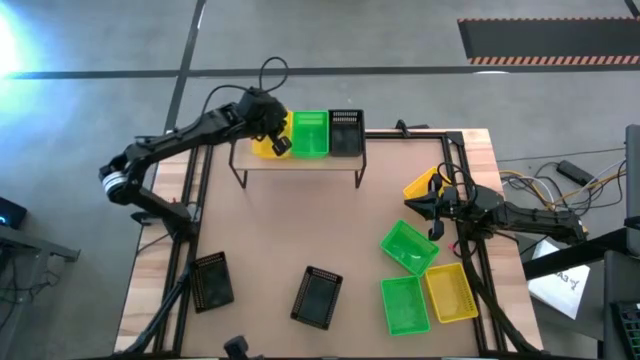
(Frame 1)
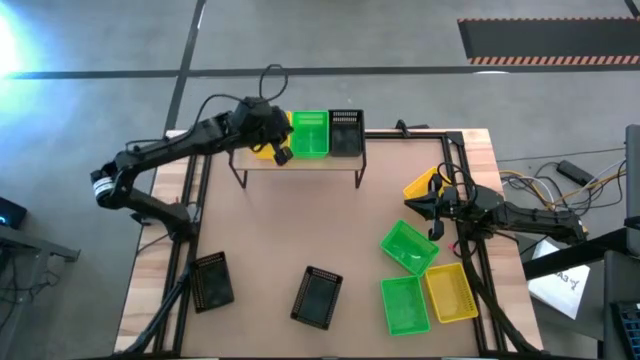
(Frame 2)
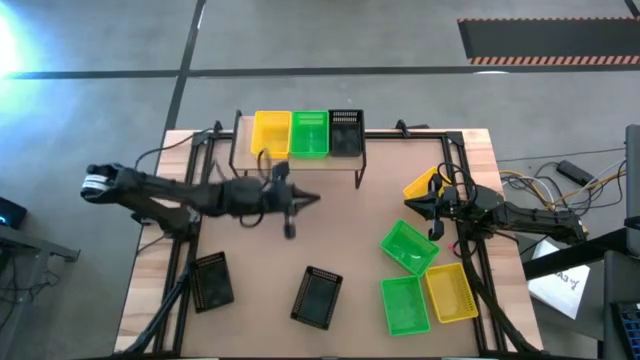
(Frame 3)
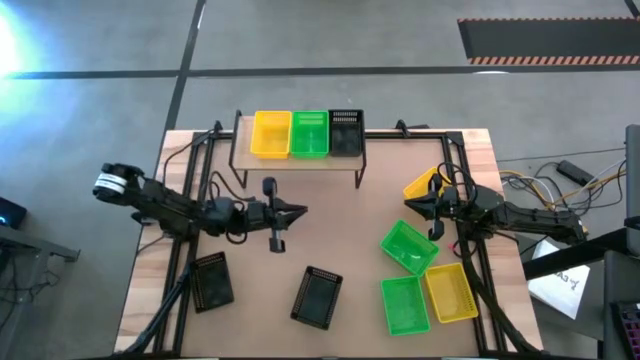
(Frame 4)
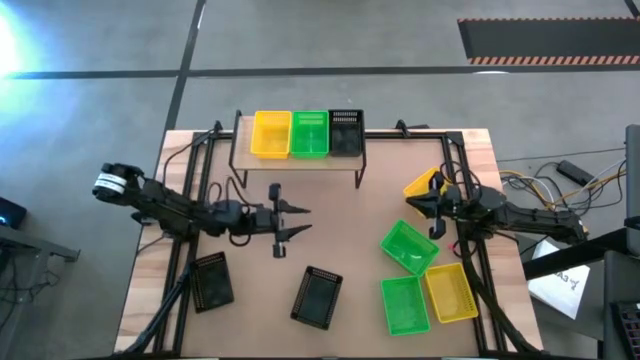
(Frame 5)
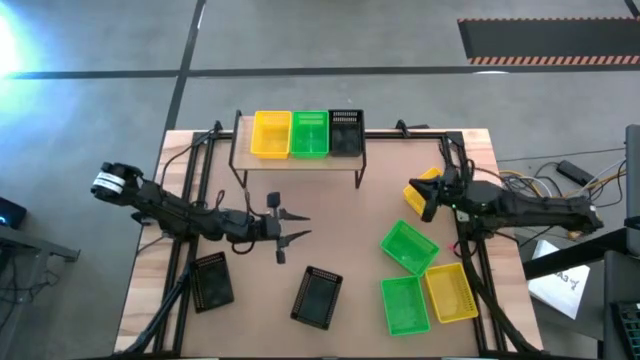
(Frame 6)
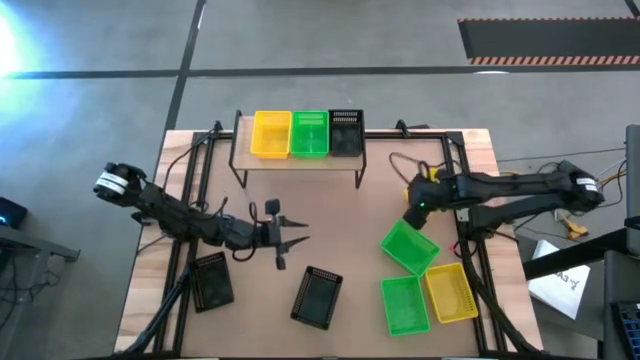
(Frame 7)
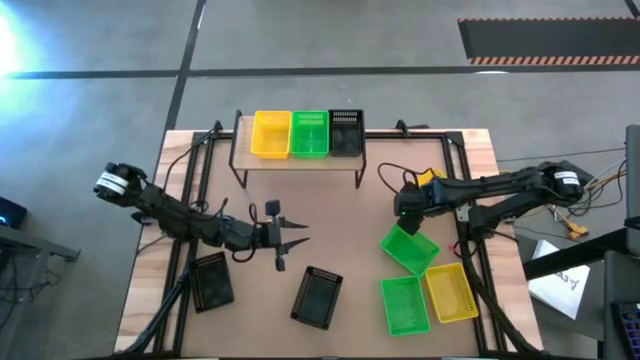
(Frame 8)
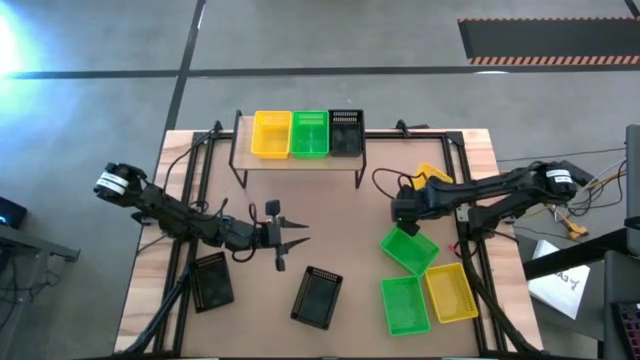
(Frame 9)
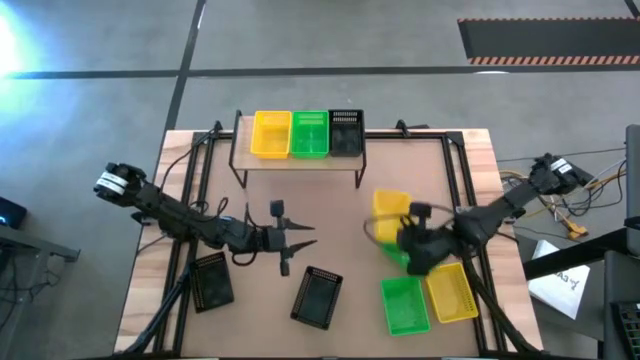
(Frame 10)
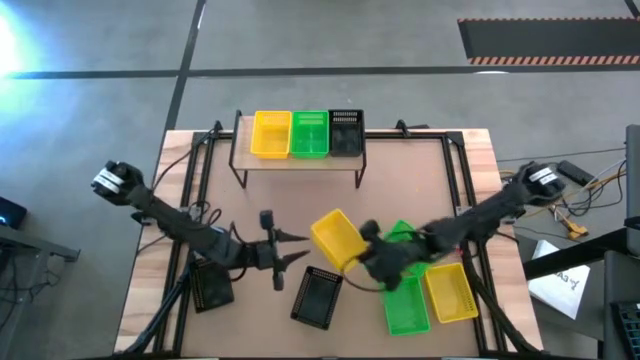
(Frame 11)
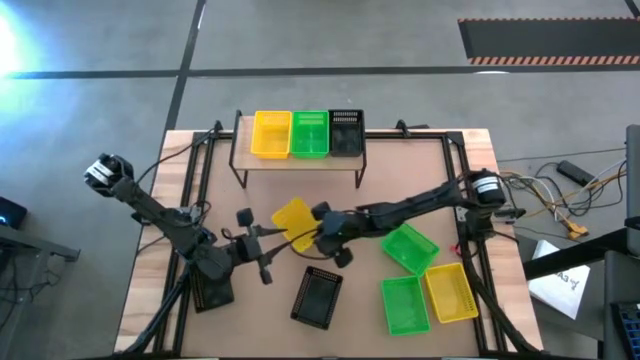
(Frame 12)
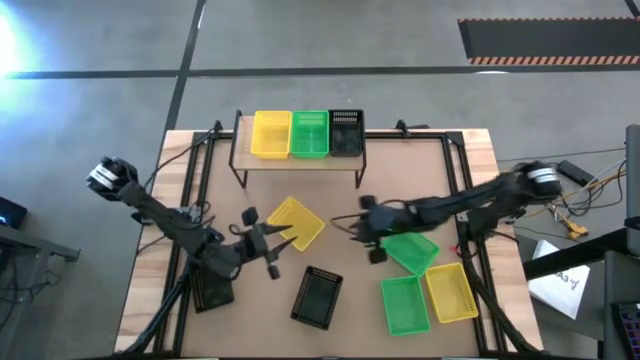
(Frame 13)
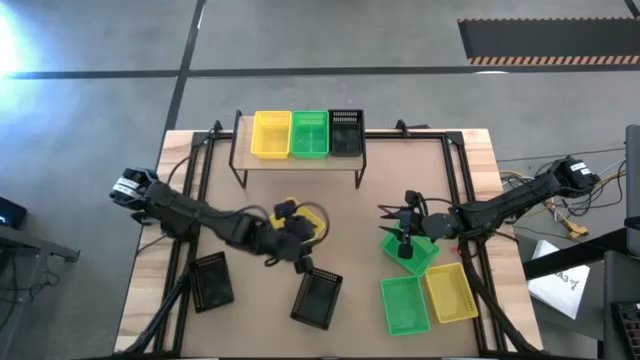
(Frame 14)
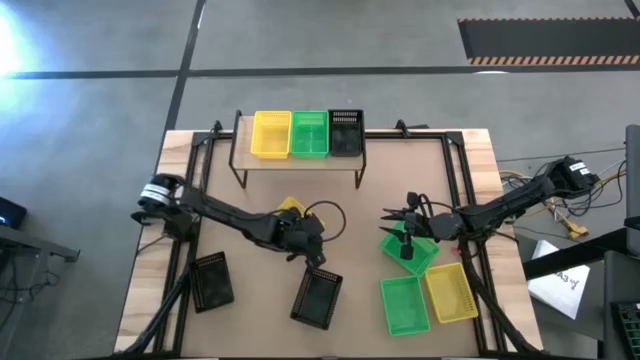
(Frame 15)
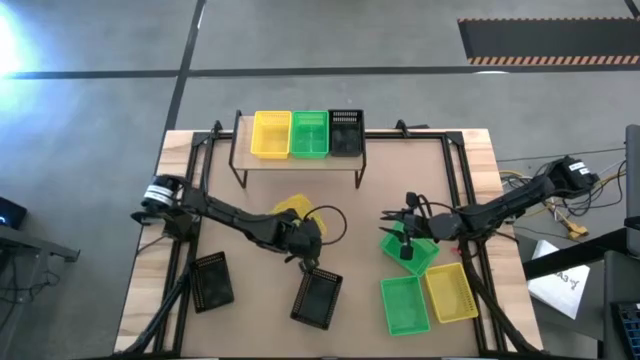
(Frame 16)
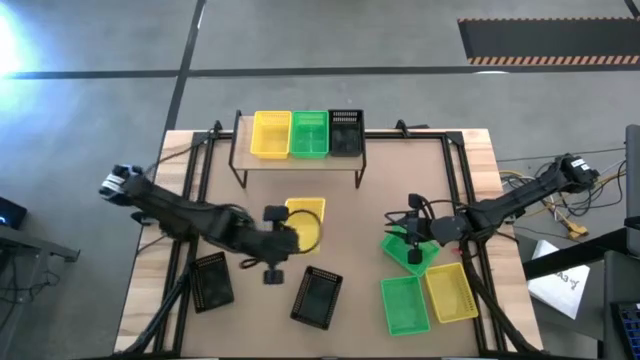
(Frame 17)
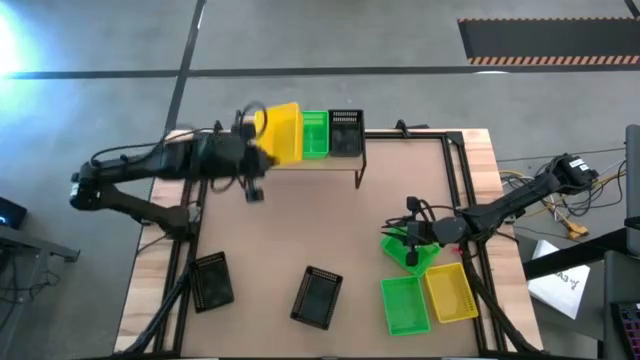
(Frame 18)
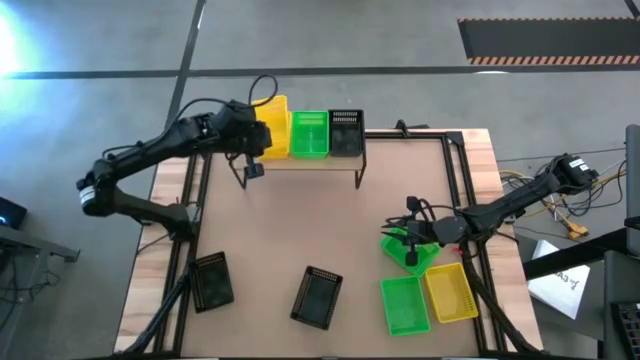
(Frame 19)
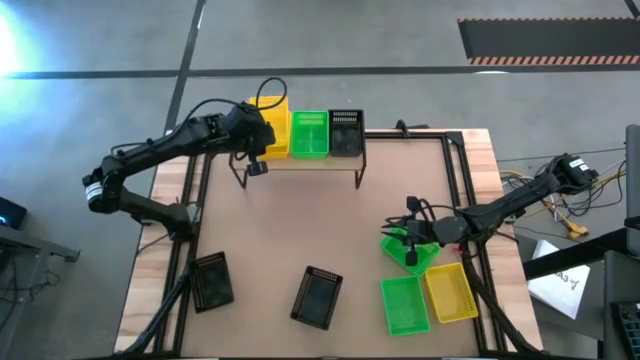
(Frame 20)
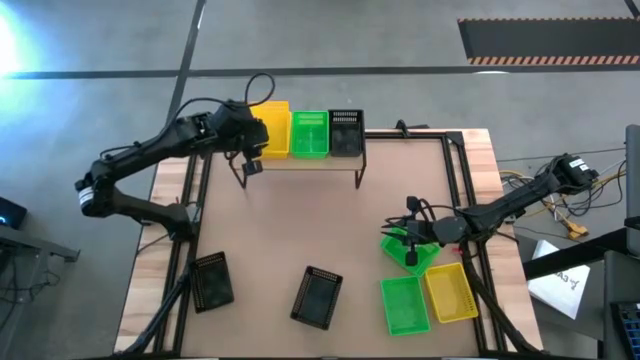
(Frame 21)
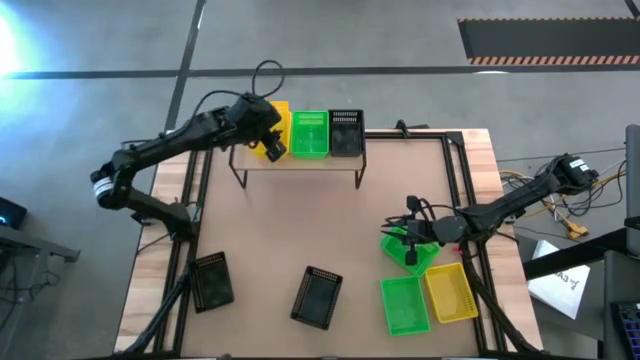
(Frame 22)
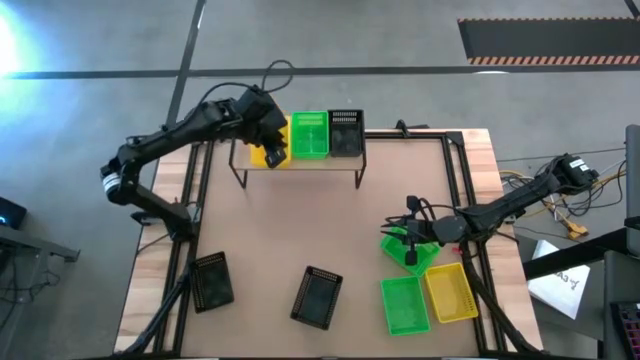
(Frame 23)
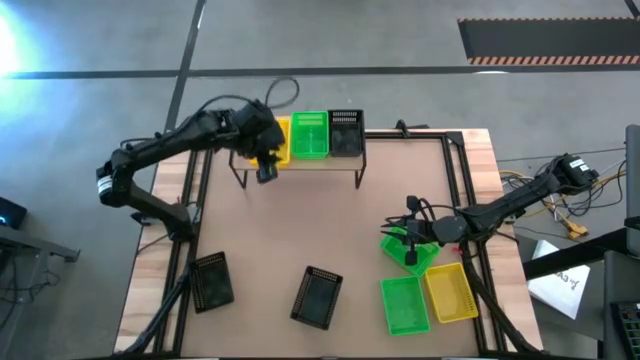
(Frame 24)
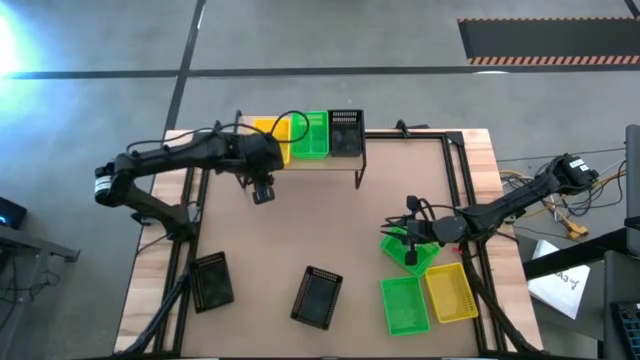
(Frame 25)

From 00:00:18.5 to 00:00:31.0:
Task: Stack baskets on shelf by color
Stack the top yellow basket on the other yellow basket on the shelf

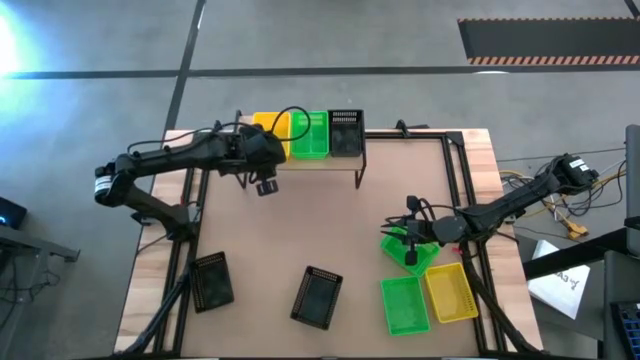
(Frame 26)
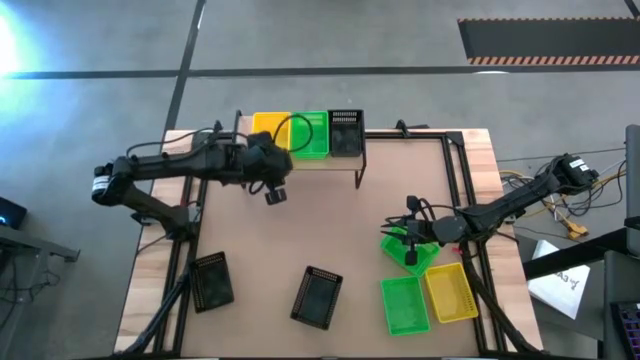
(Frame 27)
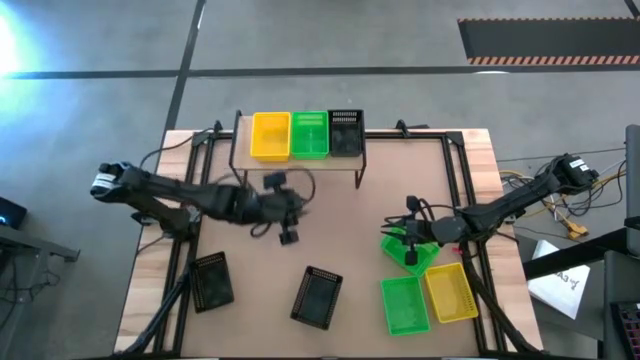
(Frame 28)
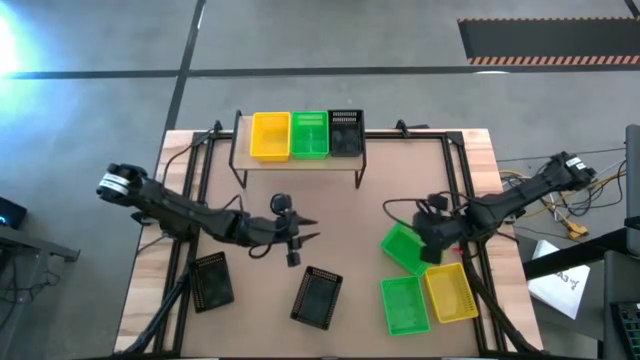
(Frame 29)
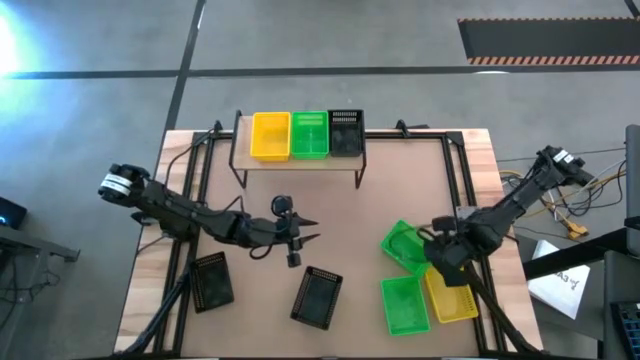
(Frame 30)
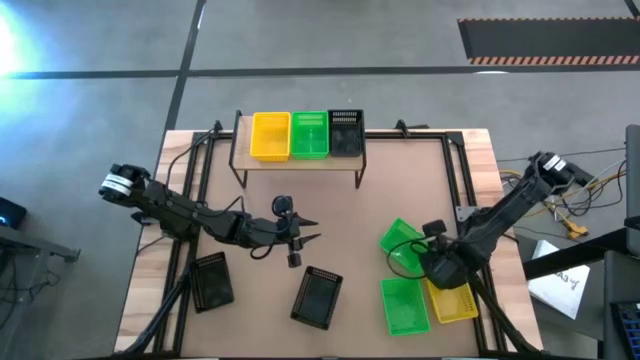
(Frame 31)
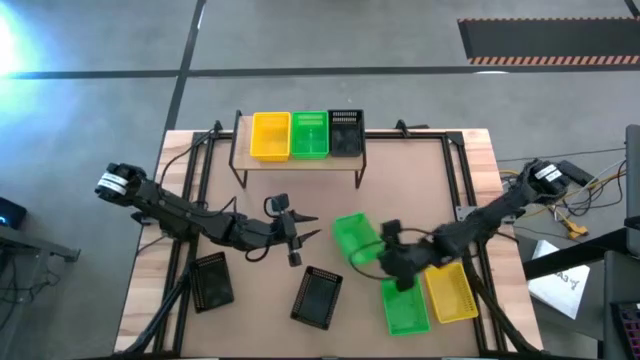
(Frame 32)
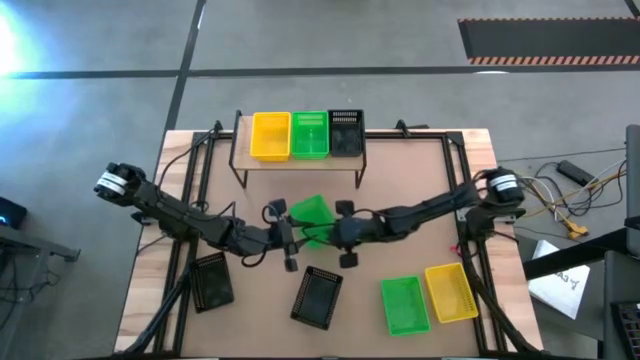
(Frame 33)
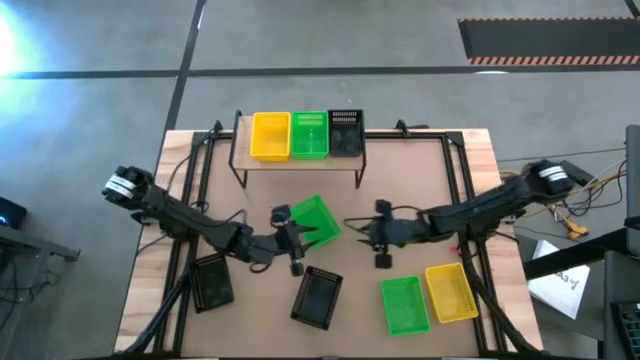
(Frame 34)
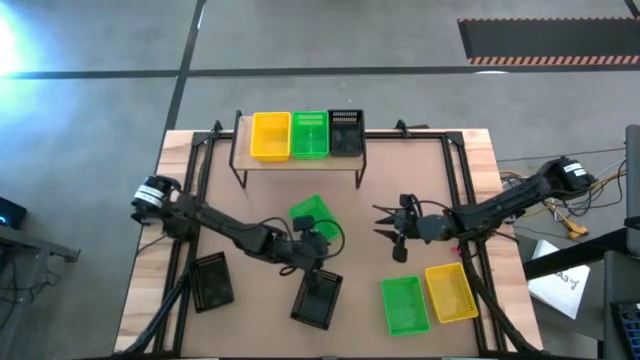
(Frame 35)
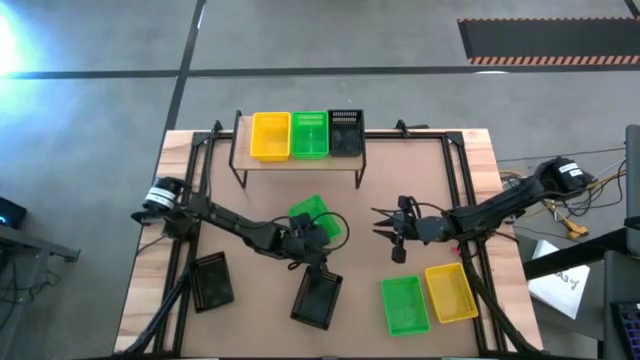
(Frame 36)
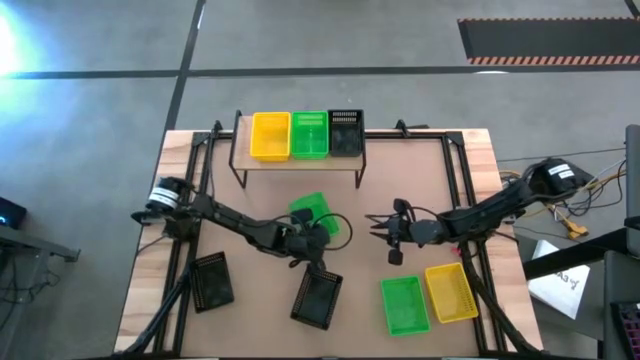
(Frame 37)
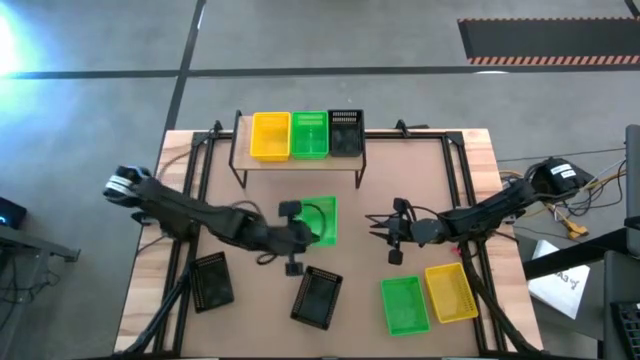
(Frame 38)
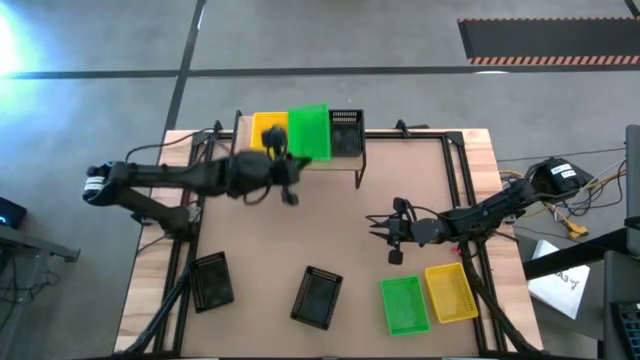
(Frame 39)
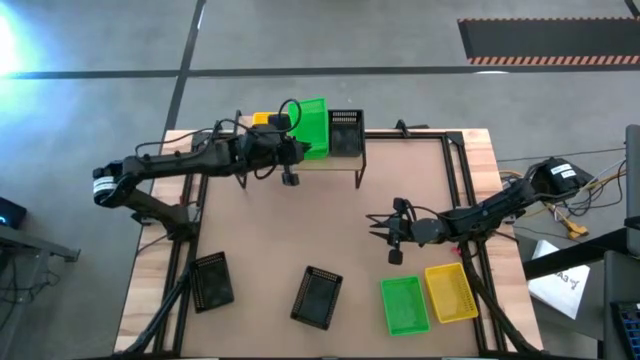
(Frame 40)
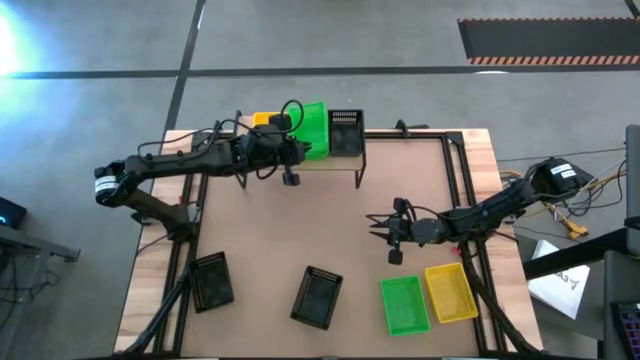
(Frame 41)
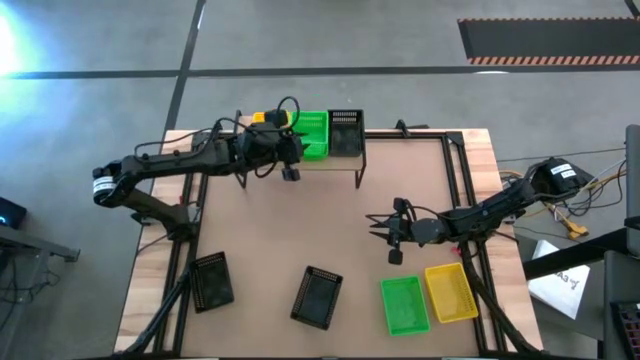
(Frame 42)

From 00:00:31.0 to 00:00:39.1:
Stack the top green basket on the other green basket on the shelf
